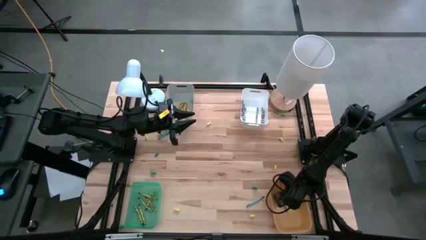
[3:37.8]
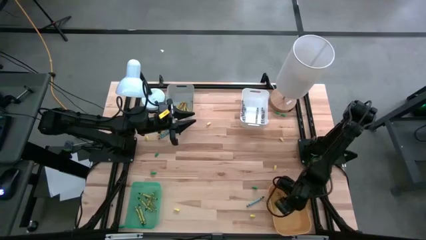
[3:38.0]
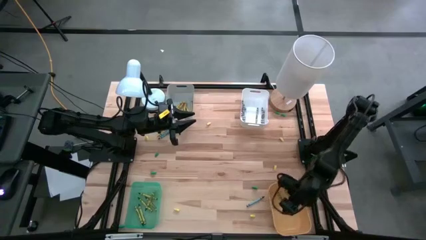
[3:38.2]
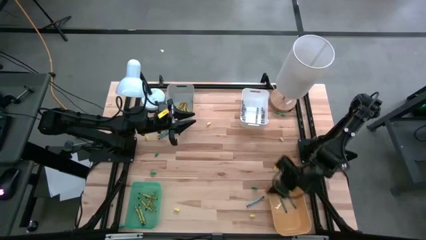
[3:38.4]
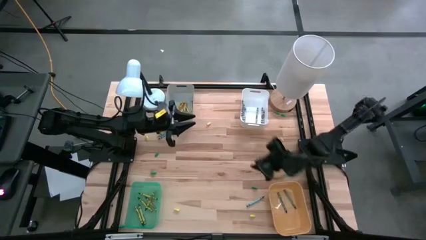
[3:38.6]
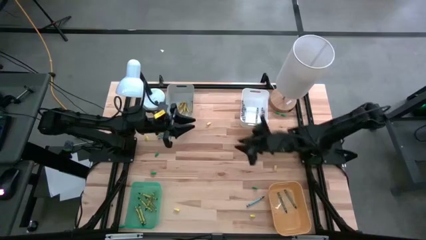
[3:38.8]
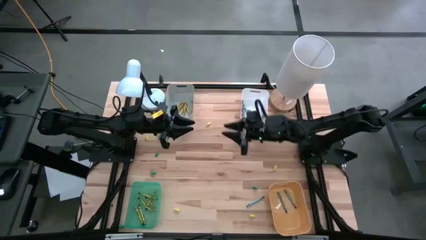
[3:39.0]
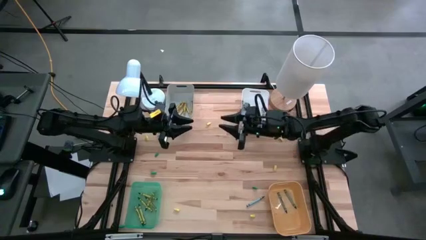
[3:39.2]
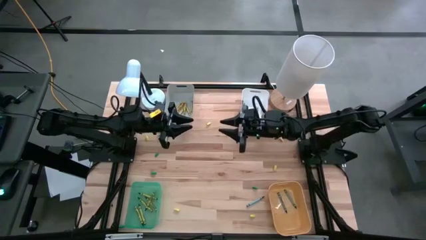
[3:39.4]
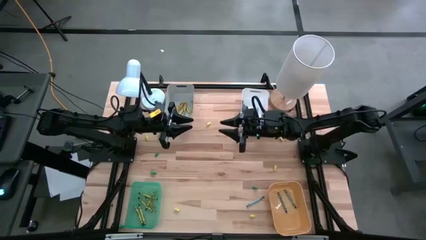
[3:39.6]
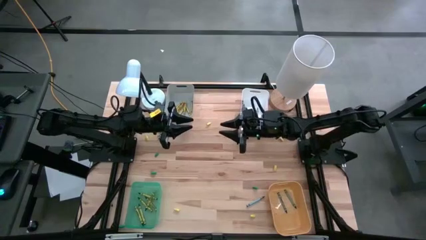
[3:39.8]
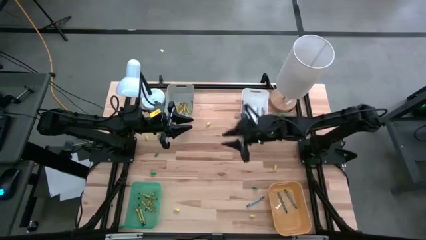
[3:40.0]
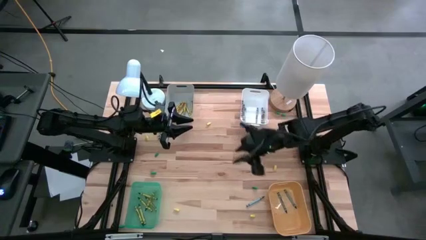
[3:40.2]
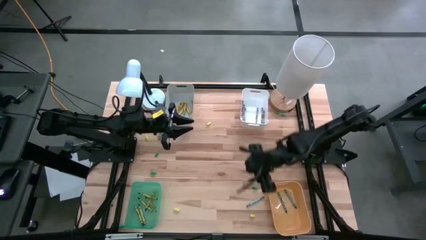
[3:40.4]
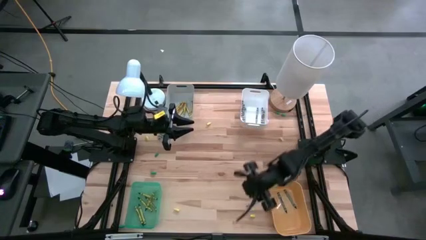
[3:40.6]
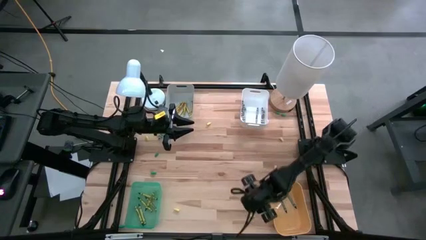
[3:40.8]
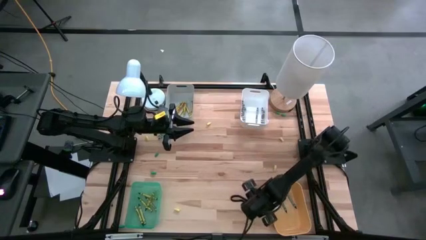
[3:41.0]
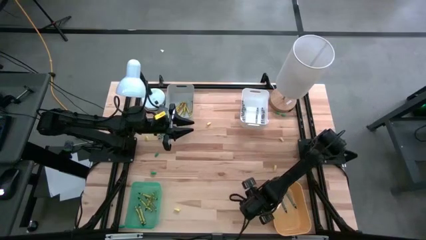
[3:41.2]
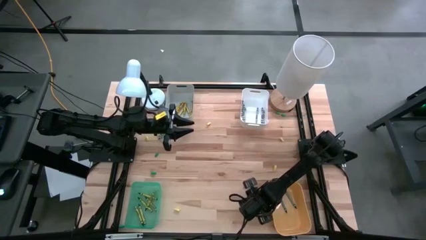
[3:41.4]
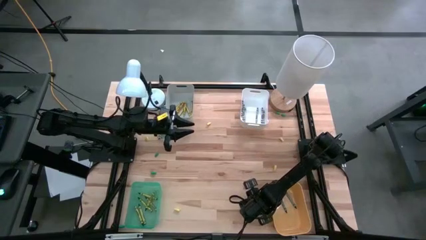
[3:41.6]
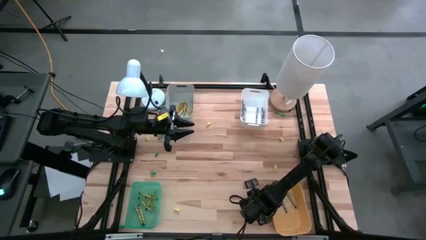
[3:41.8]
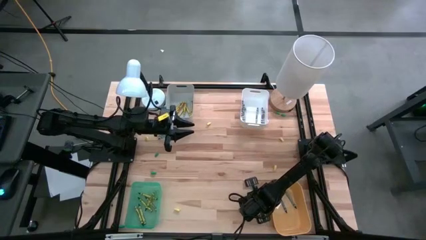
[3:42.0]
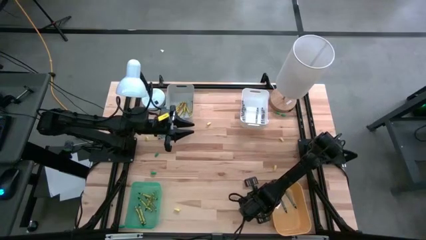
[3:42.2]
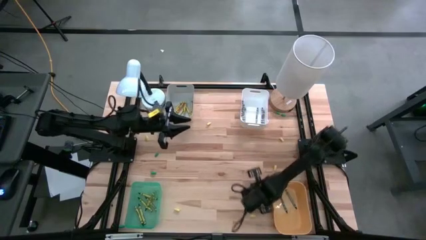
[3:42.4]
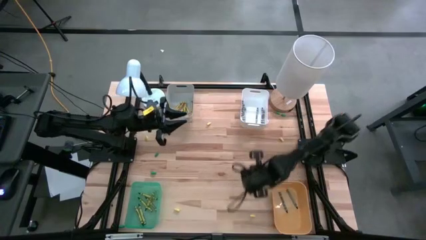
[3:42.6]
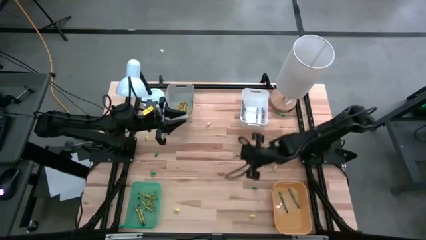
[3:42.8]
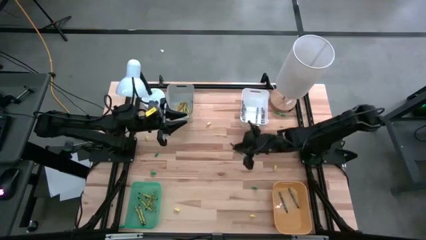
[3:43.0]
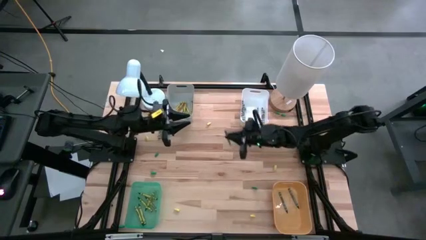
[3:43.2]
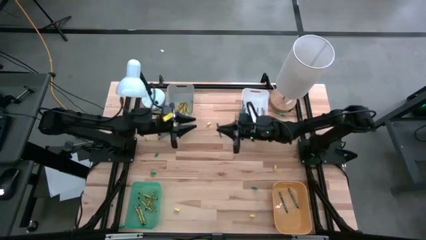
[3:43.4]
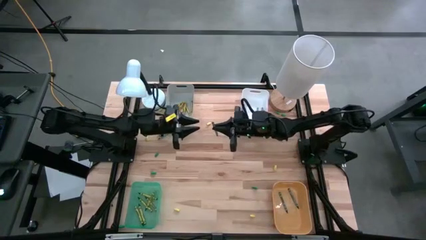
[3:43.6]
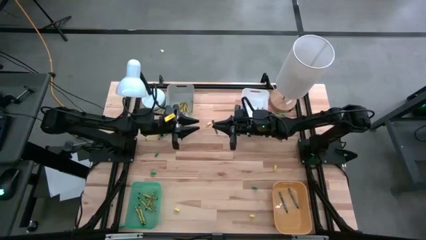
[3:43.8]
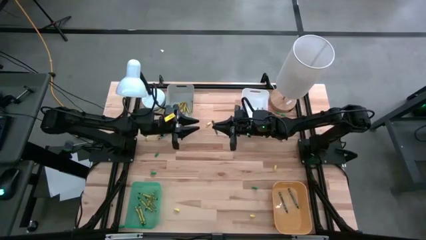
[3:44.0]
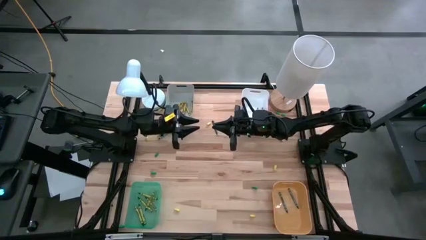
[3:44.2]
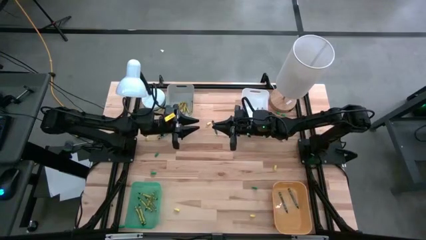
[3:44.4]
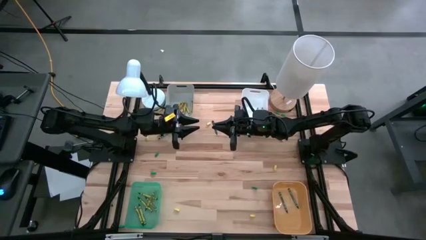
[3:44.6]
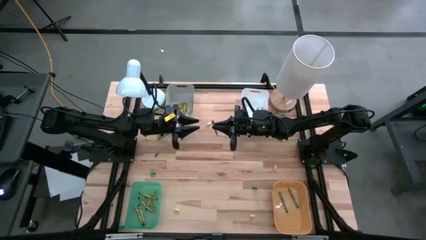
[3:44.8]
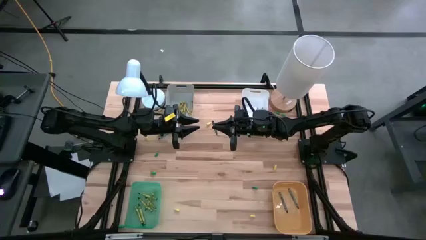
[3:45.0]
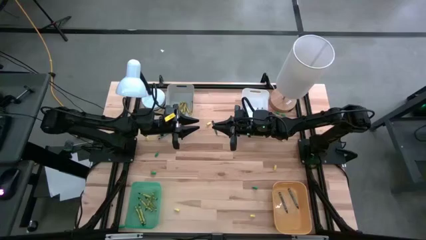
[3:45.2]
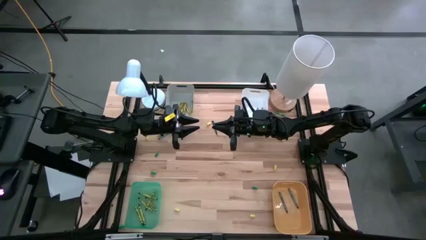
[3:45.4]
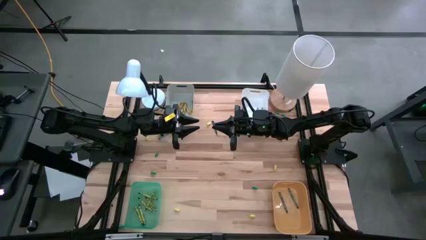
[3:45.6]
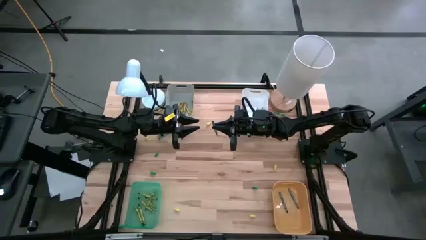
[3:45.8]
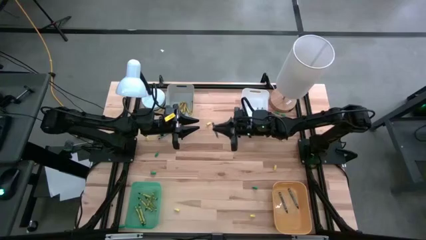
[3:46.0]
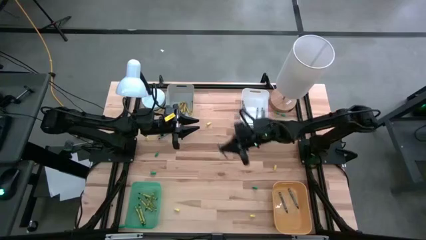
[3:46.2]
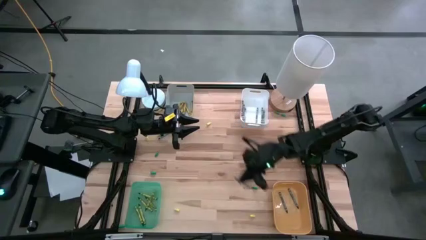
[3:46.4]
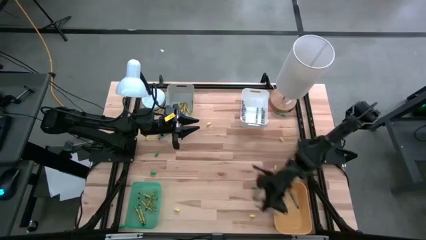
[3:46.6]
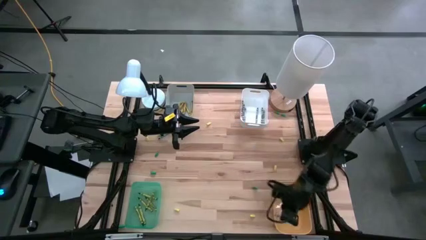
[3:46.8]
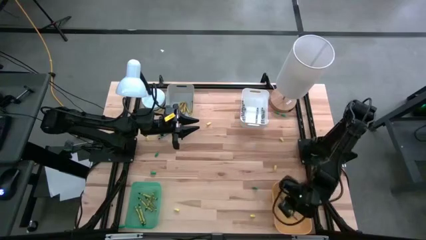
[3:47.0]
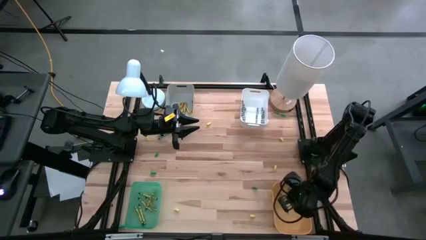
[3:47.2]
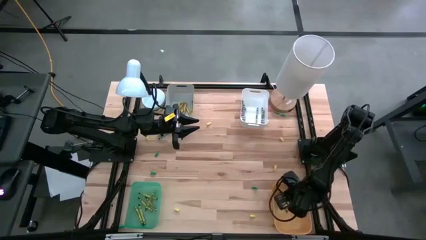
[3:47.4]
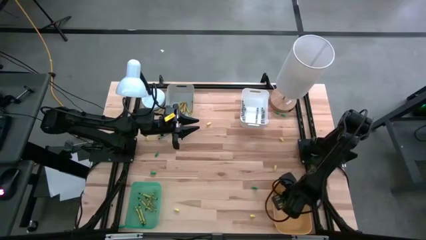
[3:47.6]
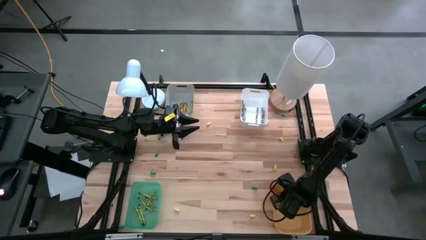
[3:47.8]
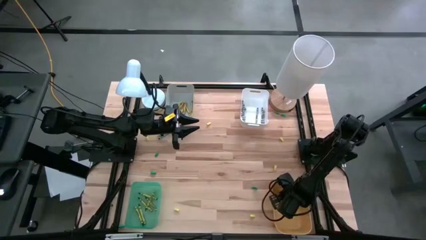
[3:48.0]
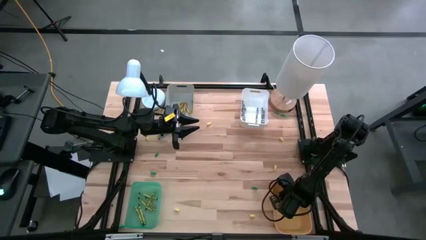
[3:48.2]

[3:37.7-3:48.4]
Task: Sort crayons
Put the blue crayon into the yellow bin
